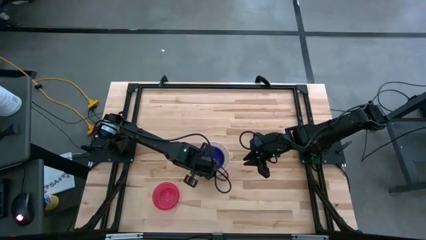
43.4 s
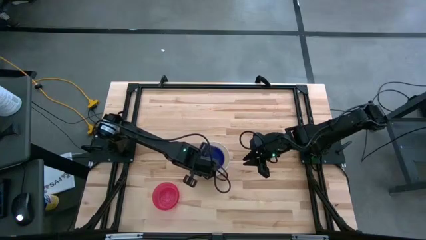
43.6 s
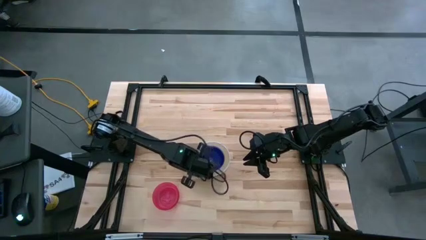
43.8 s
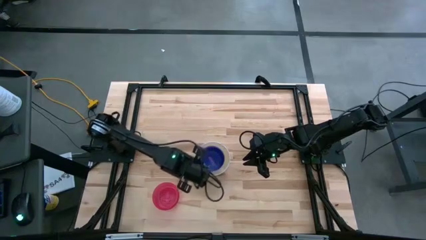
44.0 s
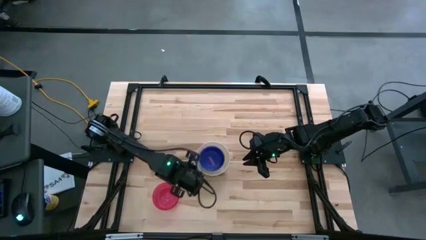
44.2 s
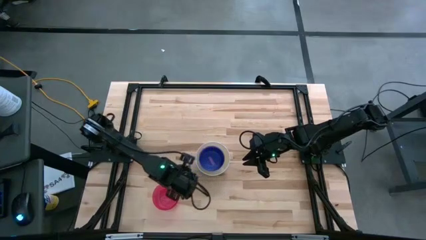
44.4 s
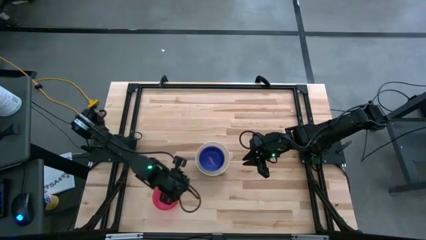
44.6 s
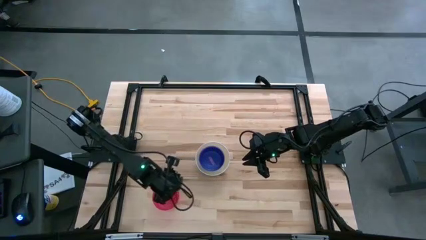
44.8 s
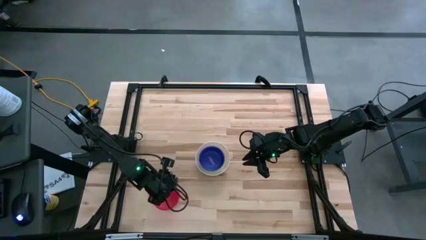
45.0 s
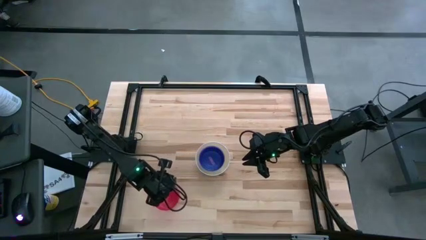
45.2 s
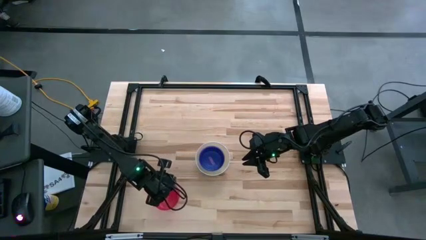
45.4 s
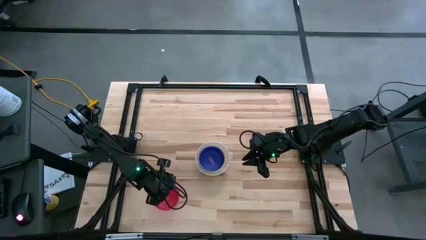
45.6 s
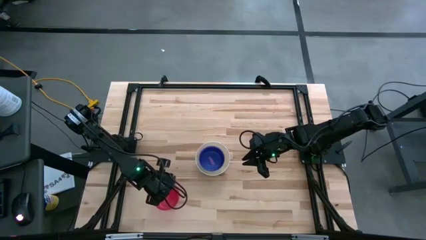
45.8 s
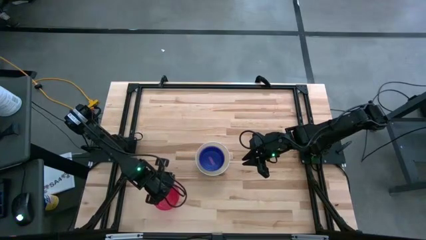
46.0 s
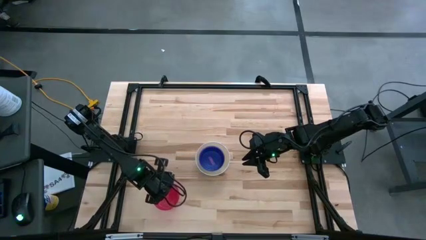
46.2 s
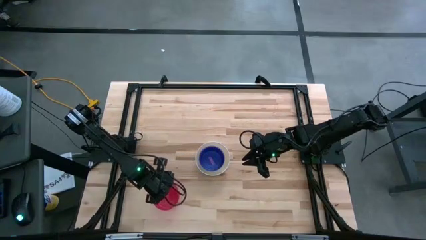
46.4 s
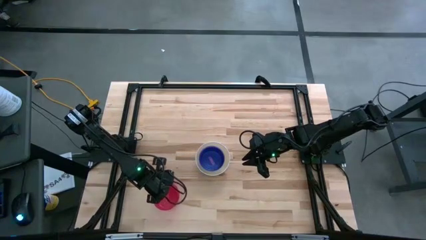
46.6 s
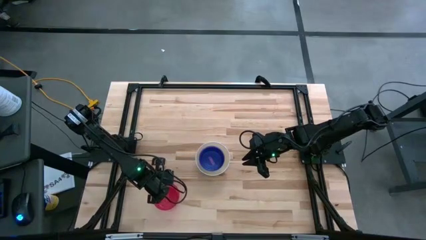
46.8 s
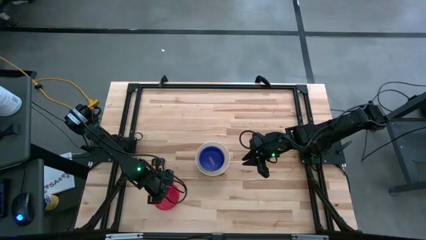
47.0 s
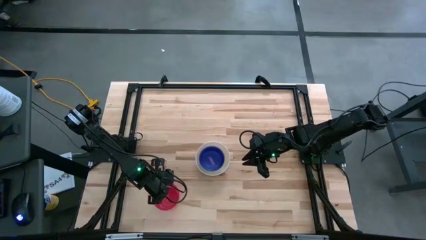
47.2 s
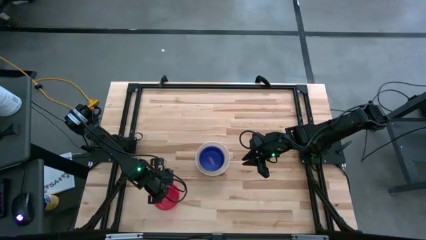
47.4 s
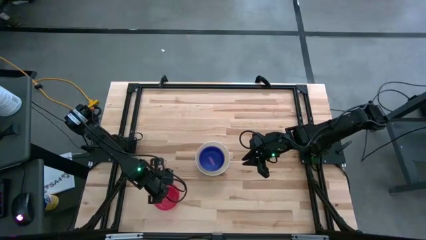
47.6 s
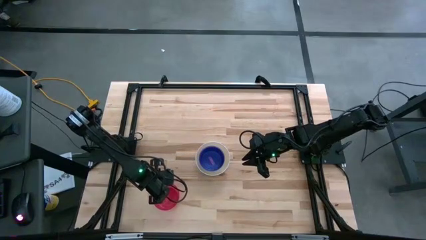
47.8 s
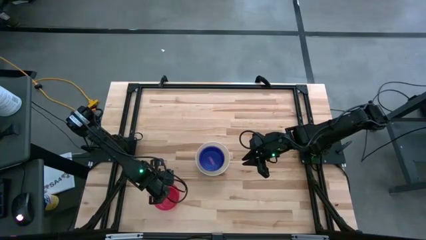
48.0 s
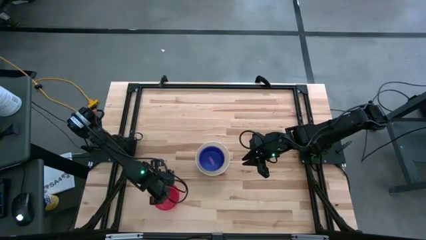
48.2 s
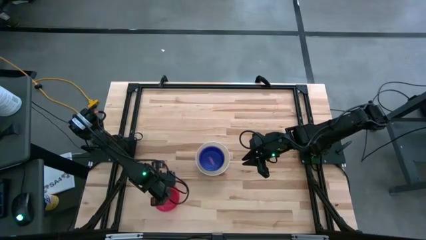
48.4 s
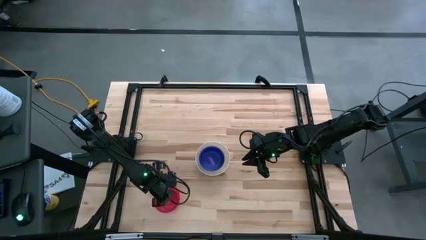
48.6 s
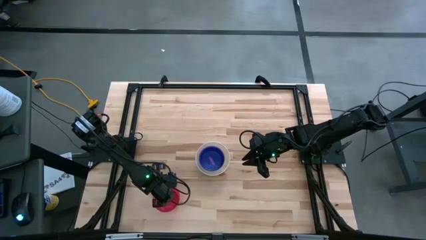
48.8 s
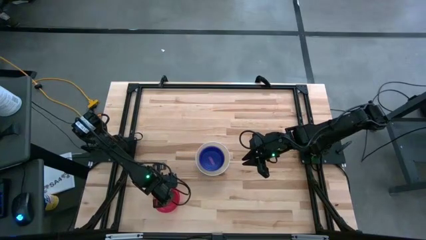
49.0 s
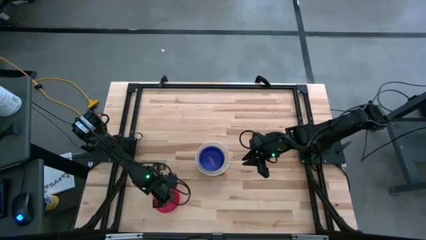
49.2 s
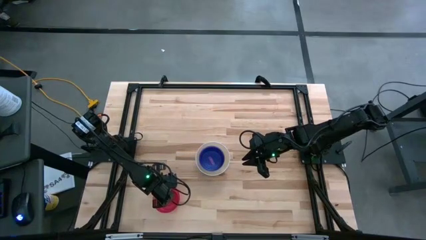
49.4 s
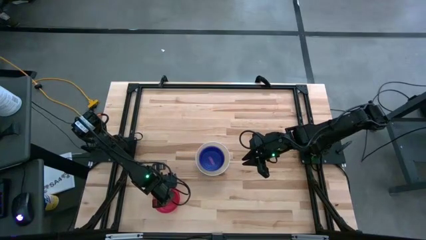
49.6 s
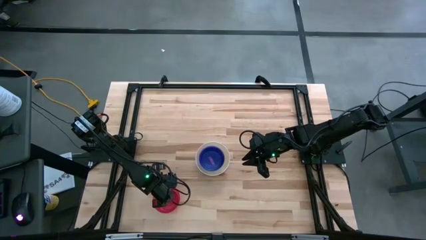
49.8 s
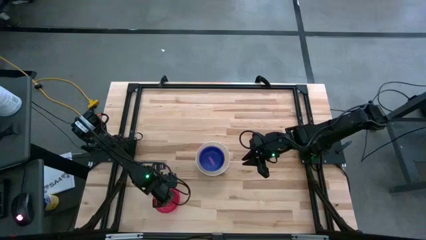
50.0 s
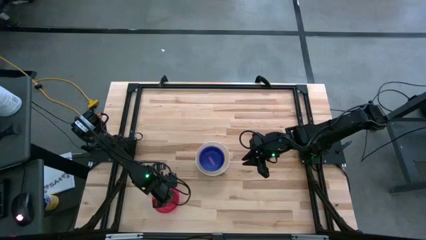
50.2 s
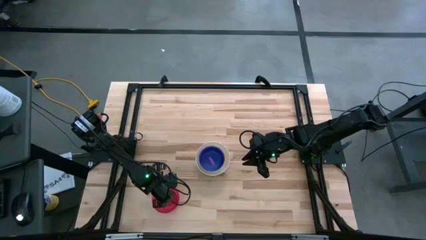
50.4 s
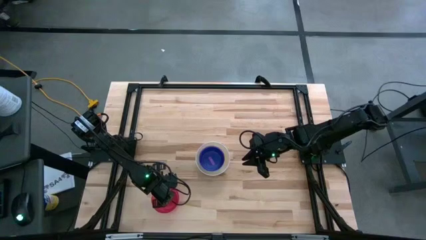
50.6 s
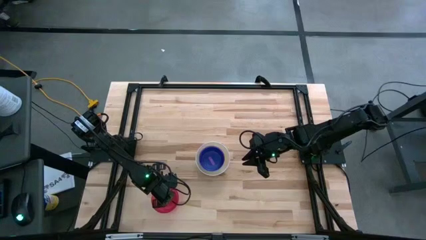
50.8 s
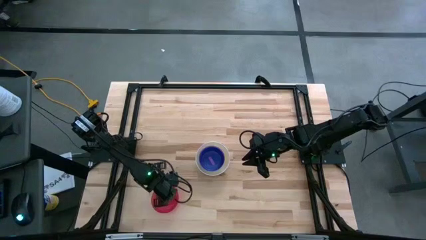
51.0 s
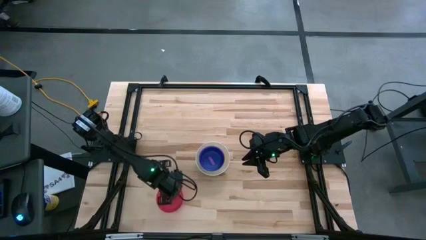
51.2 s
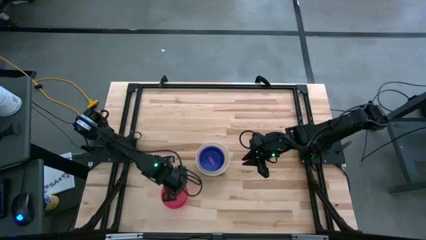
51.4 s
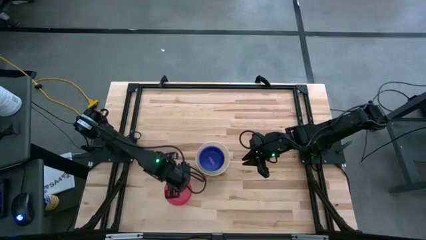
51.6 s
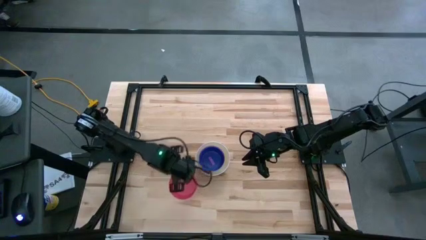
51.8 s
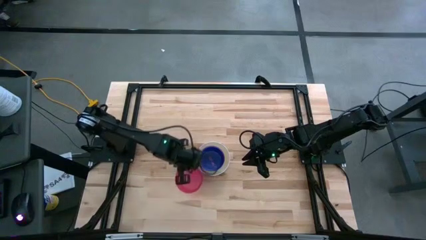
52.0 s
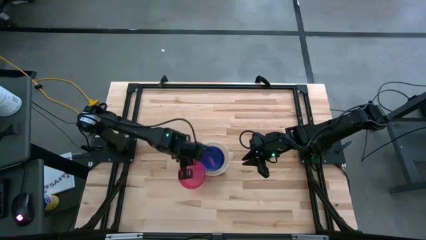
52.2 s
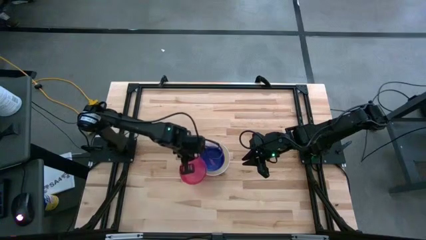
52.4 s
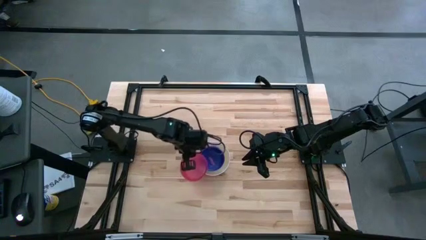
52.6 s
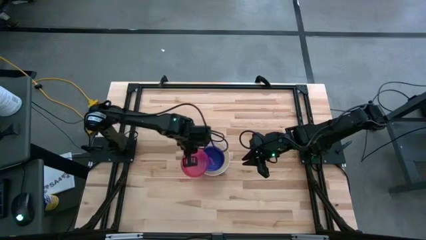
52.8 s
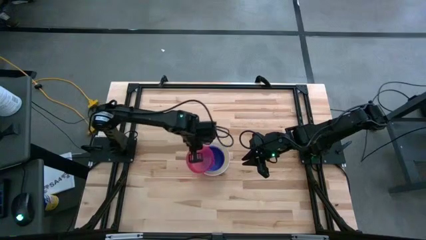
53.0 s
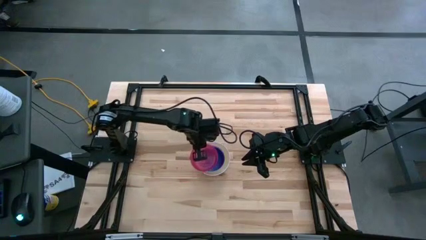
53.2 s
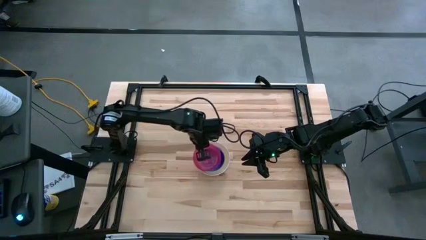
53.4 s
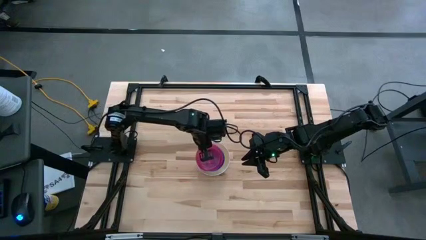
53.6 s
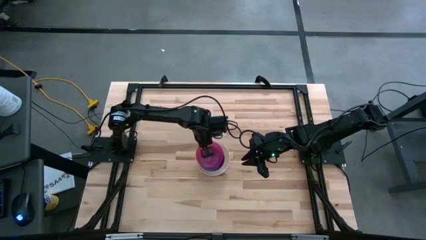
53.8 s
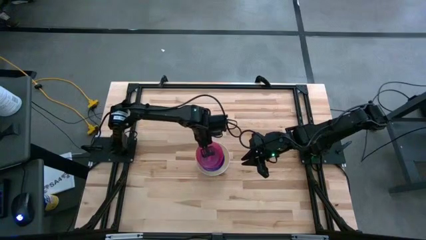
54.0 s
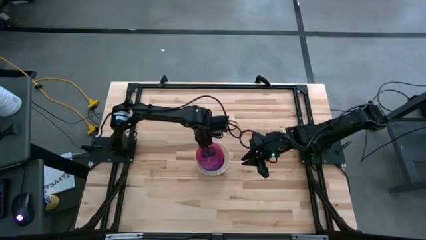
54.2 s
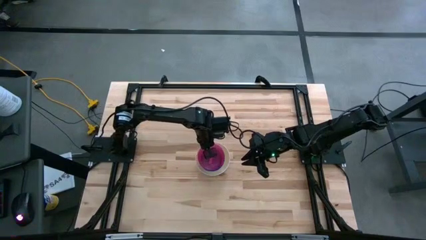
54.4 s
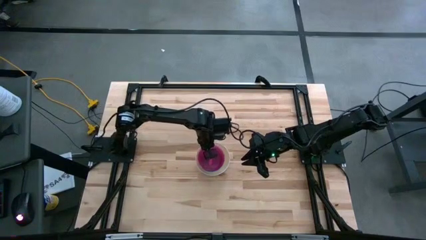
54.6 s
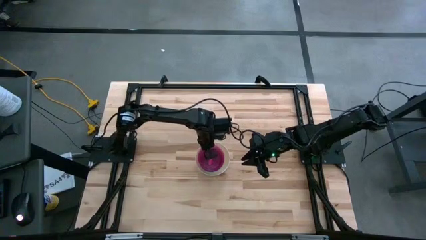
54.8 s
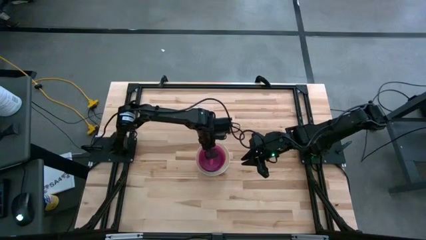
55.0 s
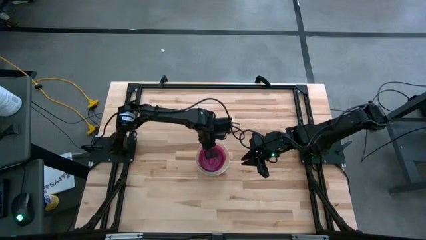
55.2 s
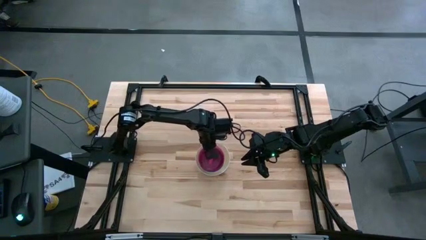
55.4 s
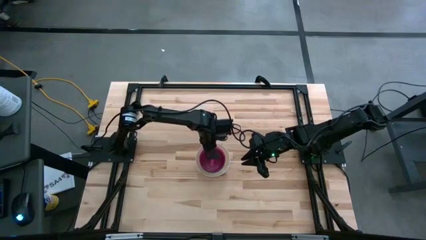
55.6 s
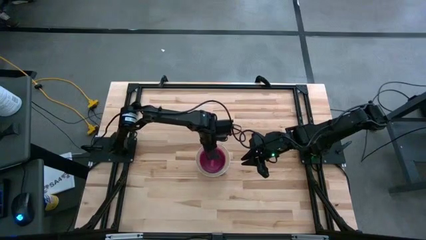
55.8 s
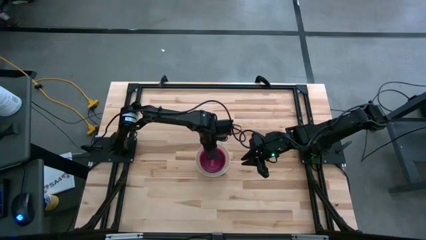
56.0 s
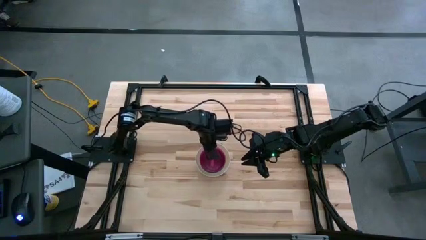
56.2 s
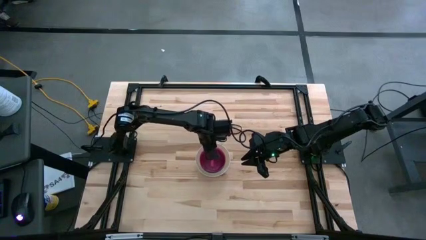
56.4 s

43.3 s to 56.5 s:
Stack the red bowl on the violet bowl
